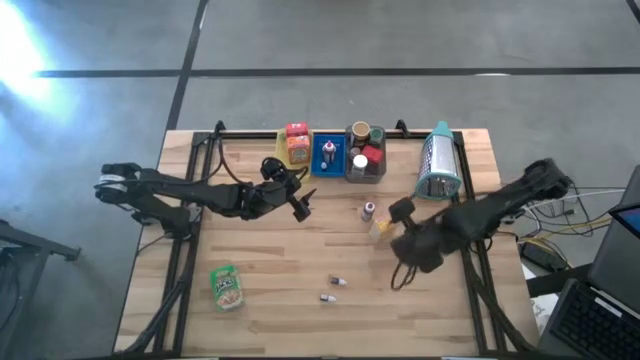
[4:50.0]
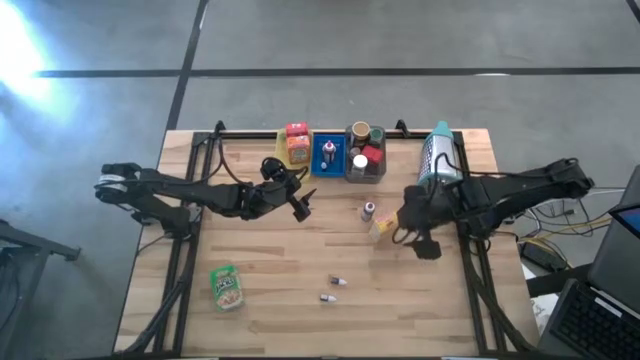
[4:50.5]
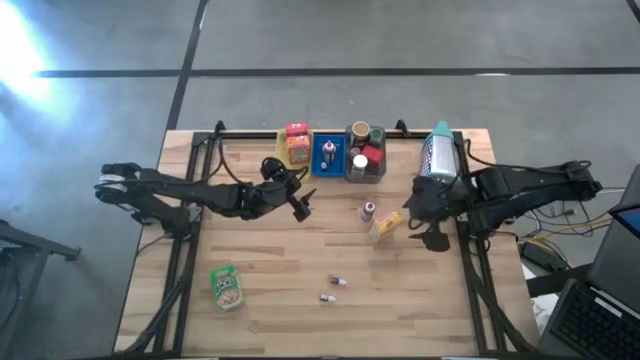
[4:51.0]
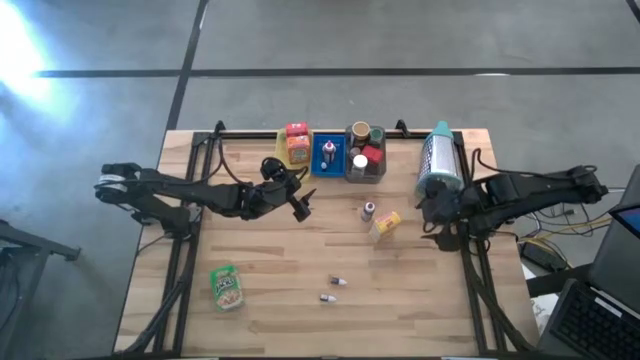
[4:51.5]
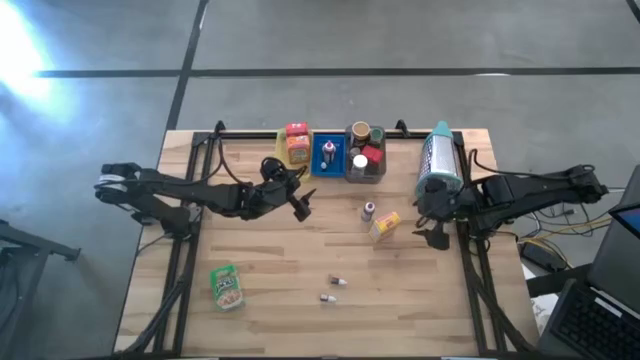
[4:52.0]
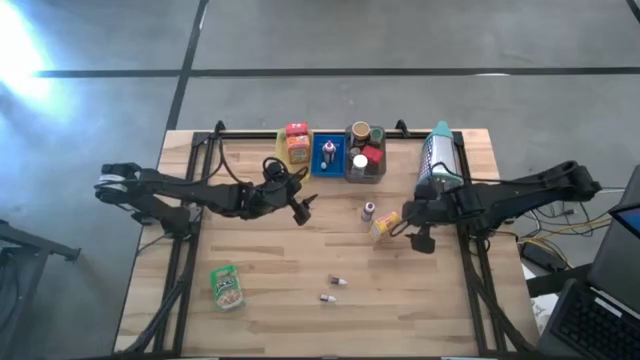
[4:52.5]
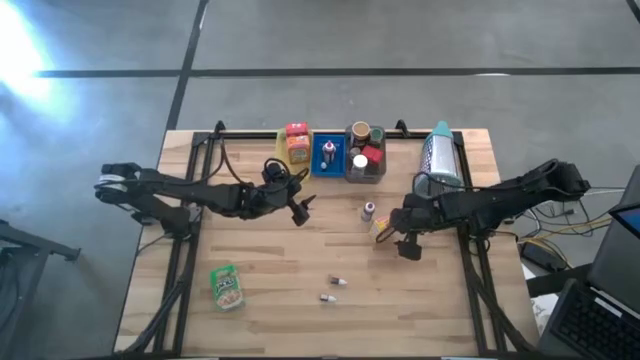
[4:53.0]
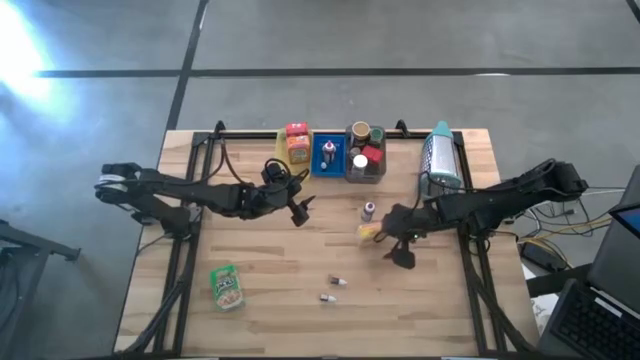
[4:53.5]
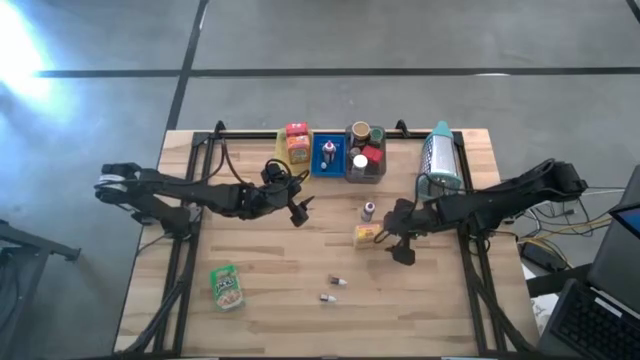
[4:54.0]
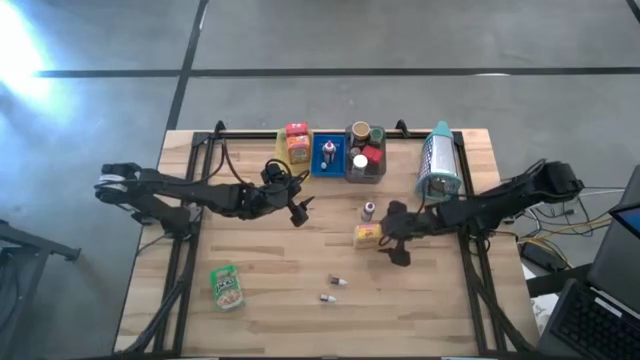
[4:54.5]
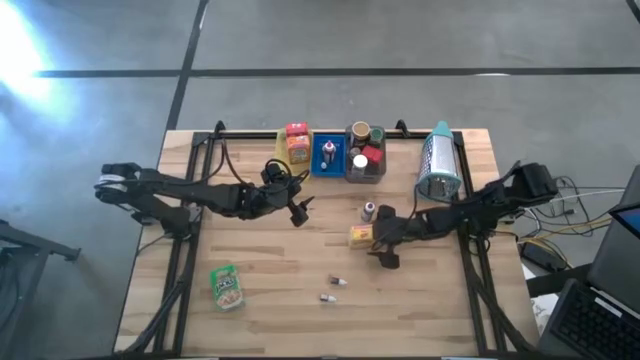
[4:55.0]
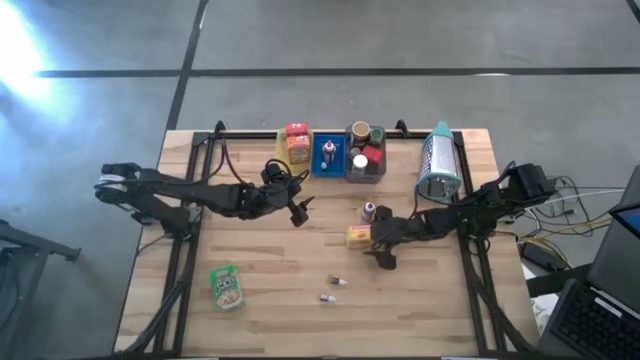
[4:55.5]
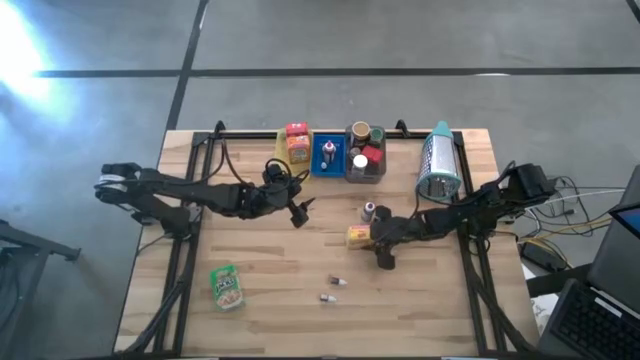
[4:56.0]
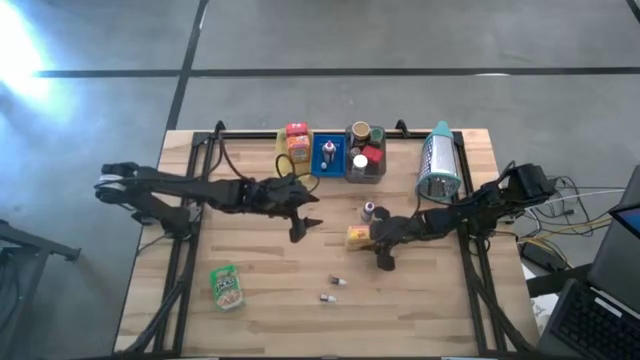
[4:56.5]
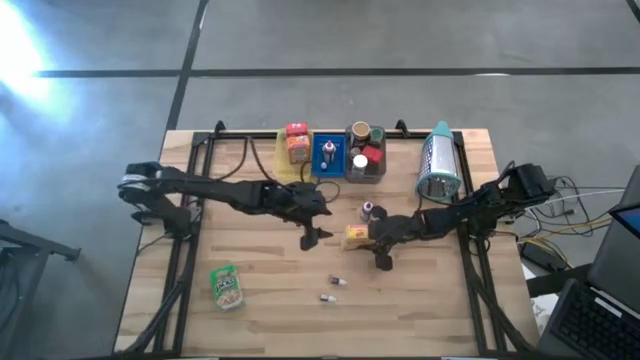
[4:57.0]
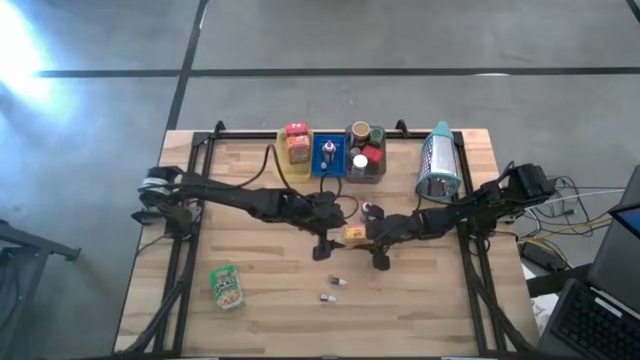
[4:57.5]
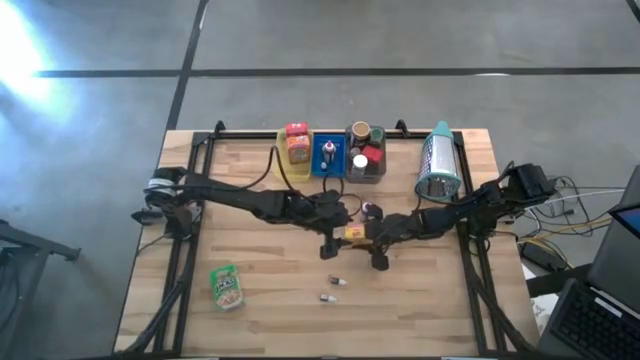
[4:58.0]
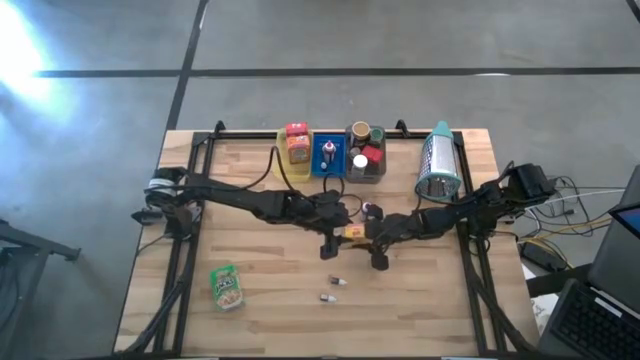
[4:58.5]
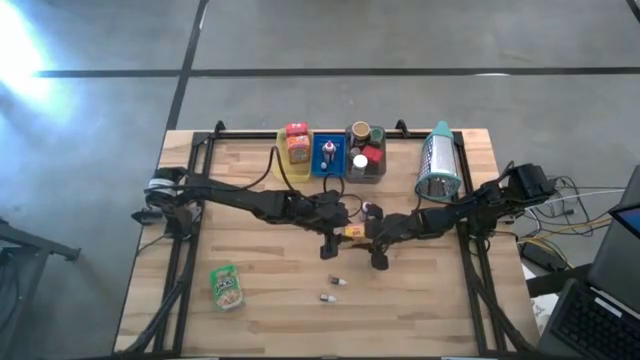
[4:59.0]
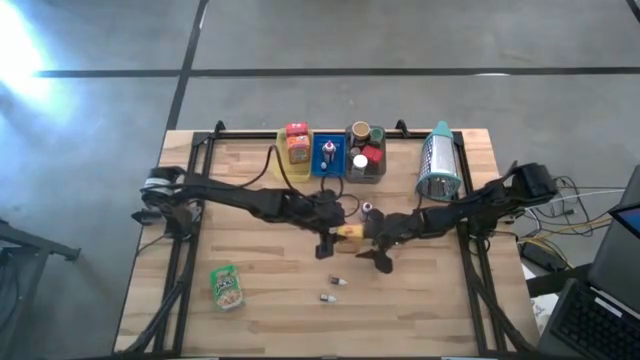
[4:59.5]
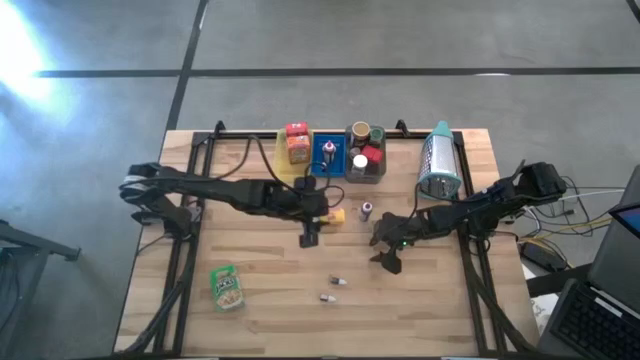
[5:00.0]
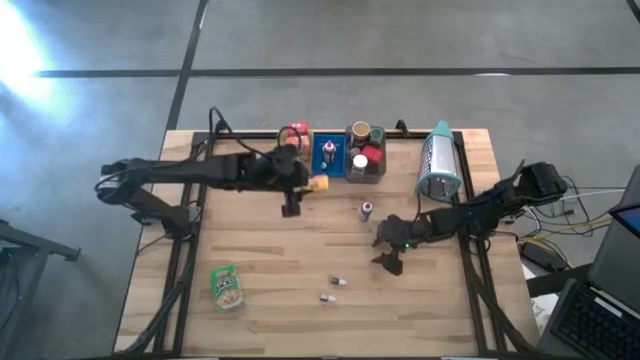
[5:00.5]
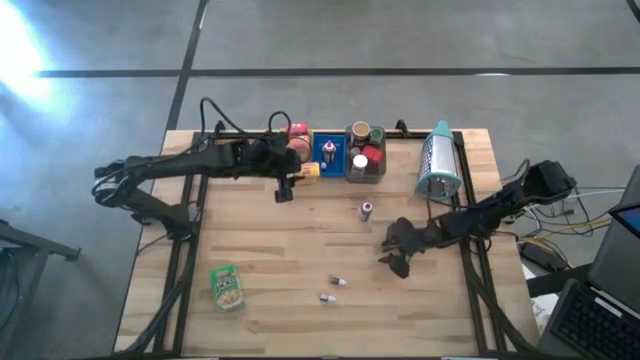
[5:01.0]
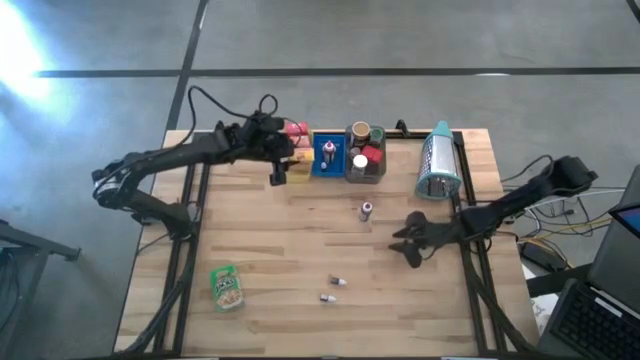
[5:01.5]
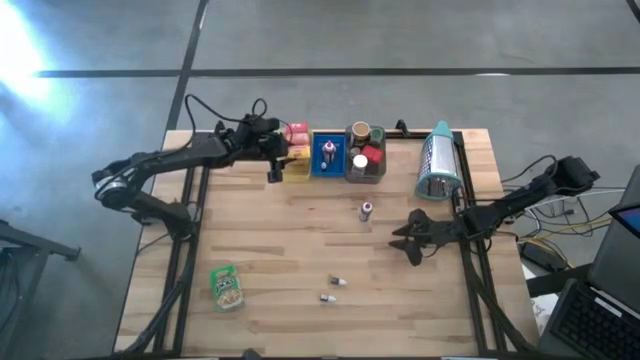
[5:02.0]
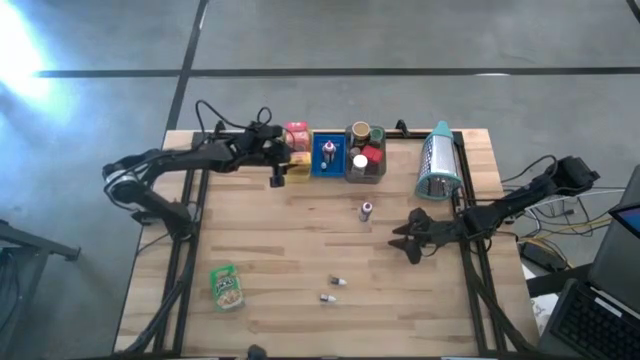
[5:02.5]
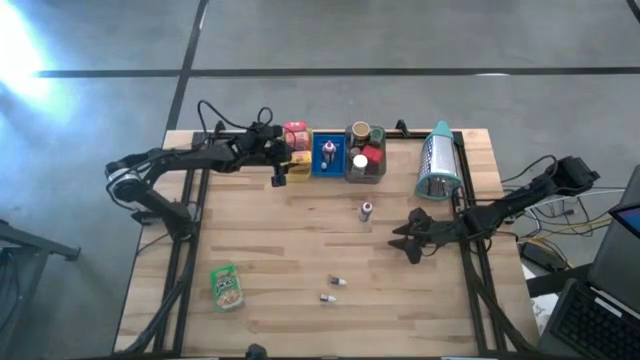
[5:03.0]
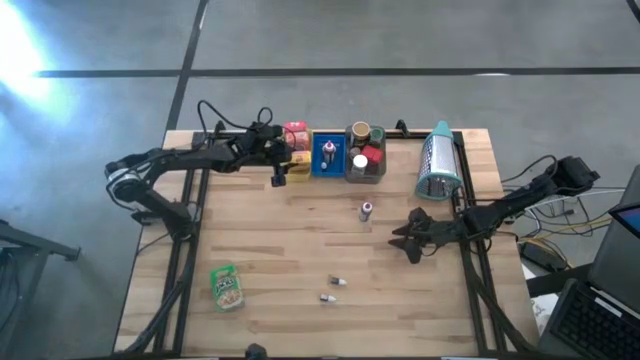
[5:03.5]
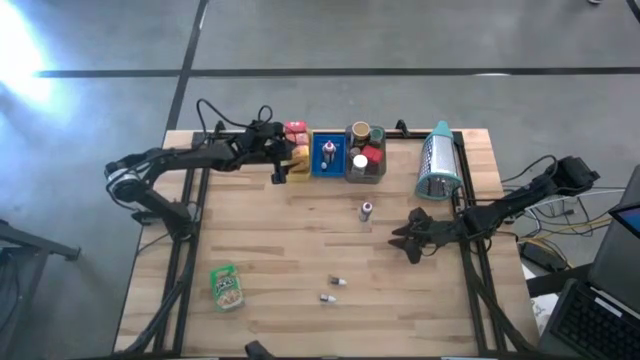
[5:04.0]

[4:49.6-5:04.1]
Task: Pick & Place Kitchen Items
Put the yellow cereal box into the yellow bin

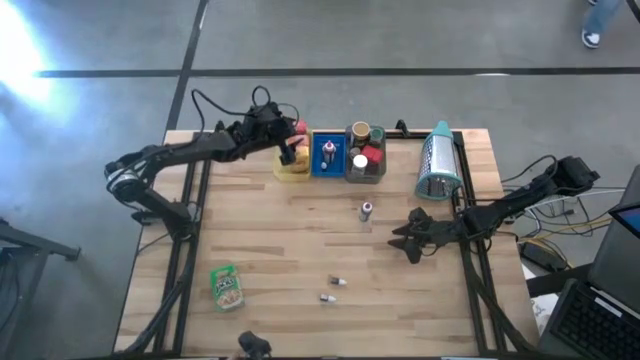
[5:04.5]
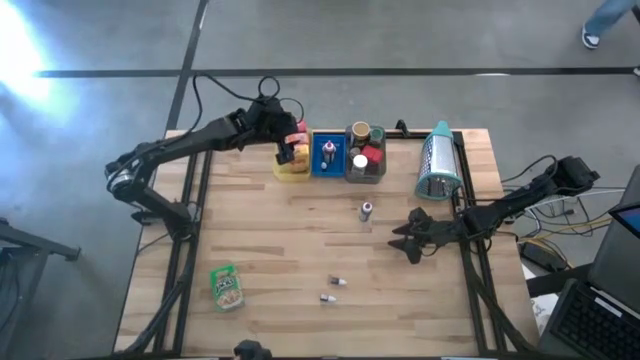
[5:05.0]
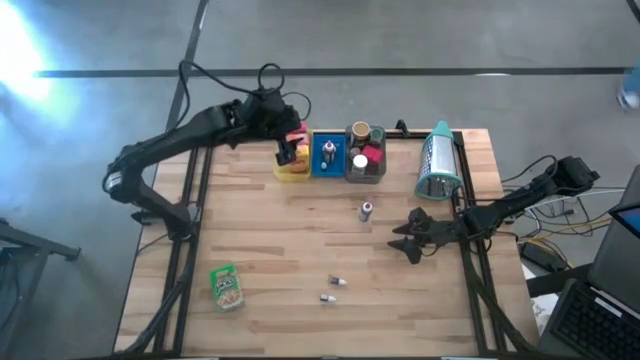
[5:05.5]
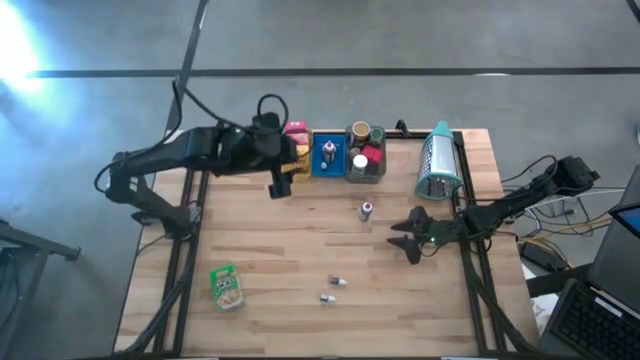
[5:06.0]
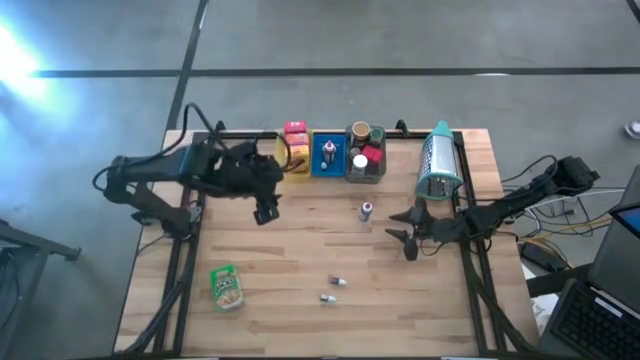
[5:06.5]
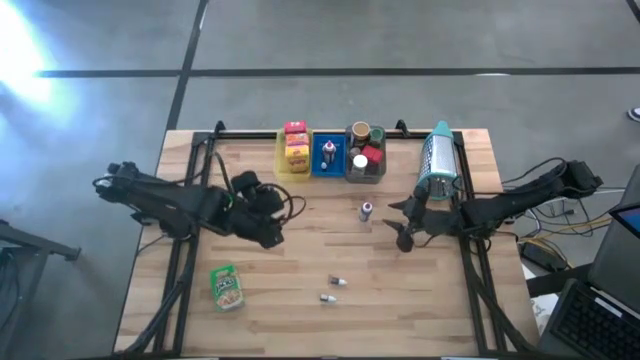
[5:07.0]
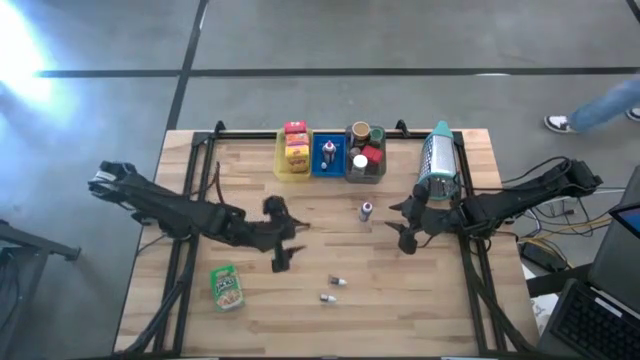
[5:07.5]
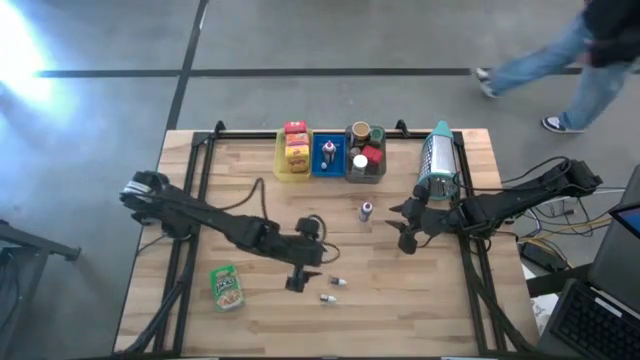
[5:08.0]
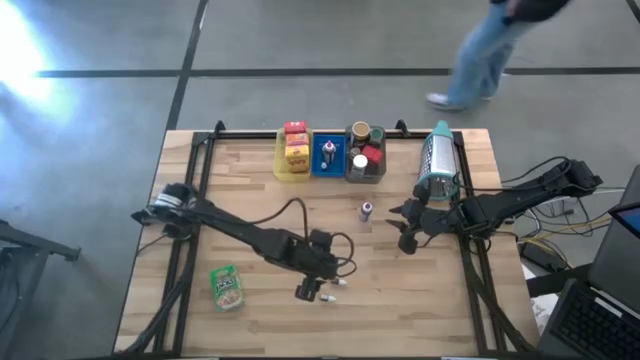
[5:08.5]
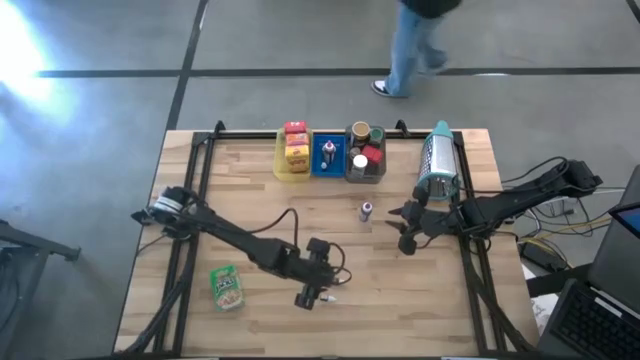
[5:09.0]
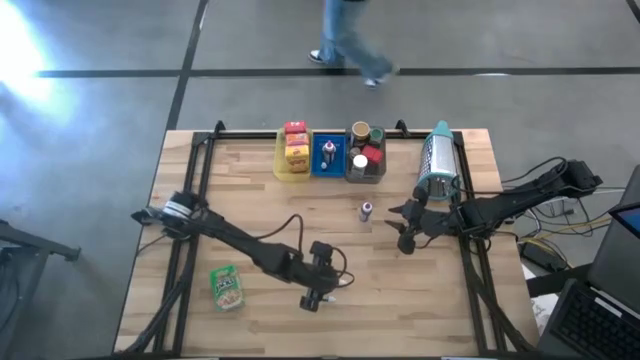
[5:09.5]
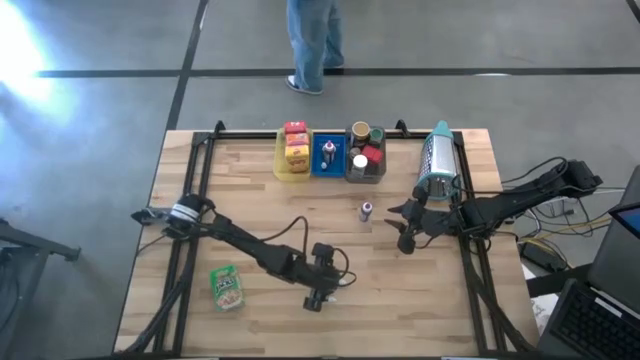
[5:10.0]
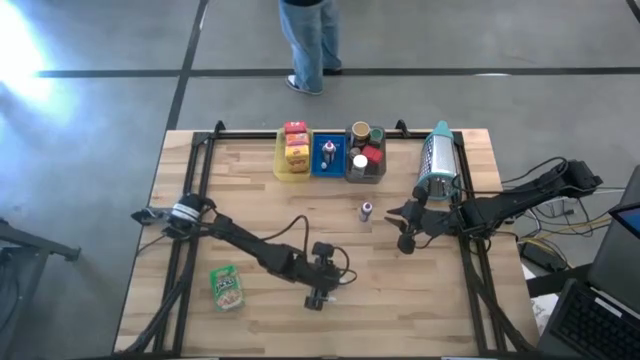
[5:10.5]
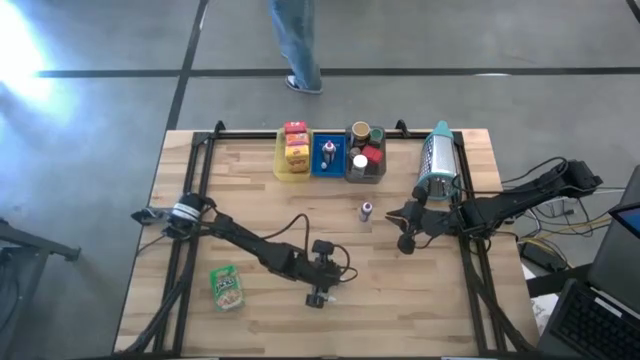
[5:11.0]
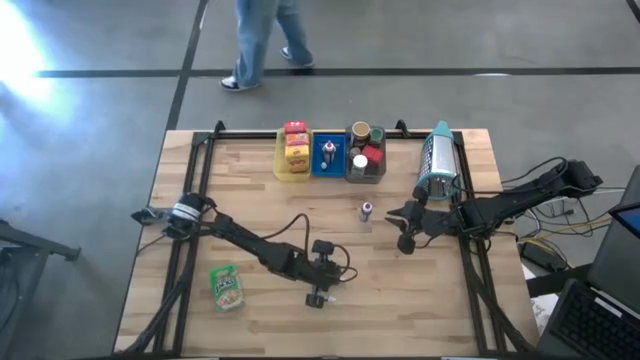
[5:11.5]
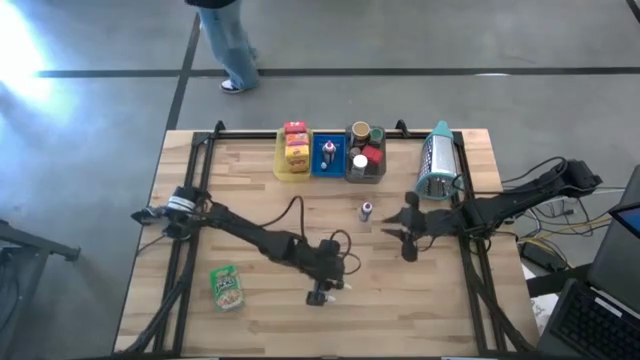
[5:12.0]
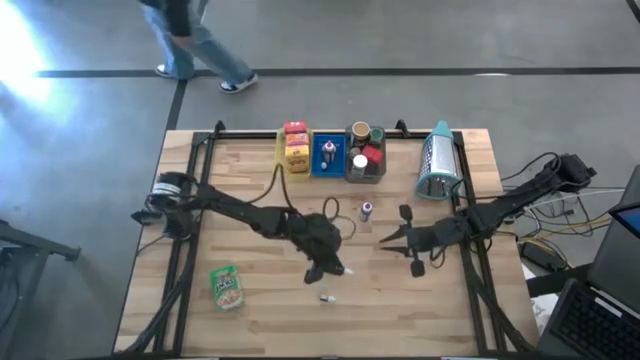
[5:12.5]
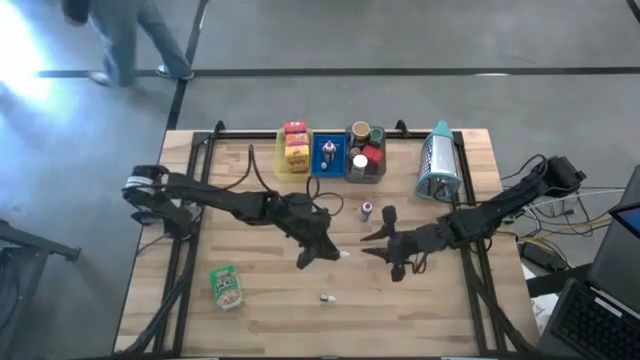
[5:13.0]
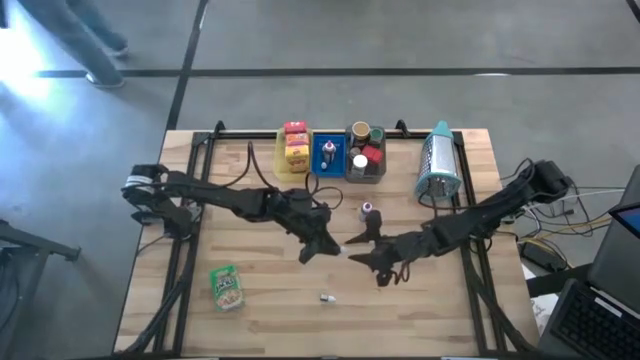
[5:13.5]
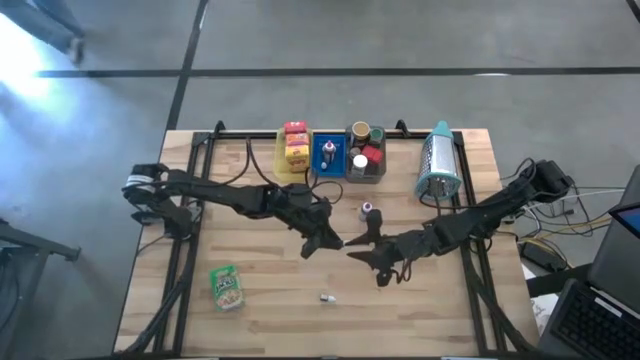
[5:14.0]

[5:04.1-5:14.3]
Put the small purple food coloring bottle into the blue bin
